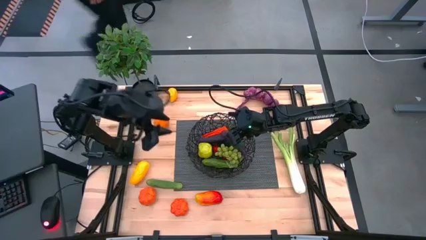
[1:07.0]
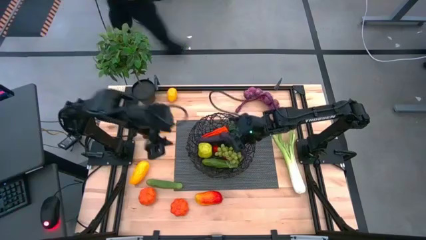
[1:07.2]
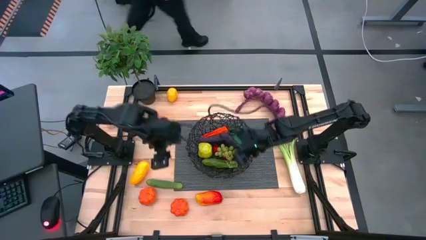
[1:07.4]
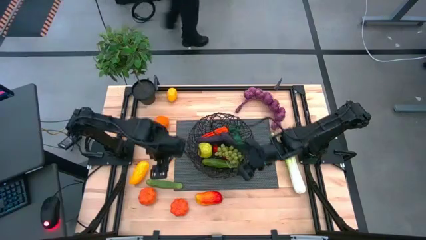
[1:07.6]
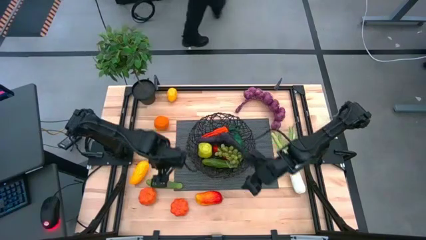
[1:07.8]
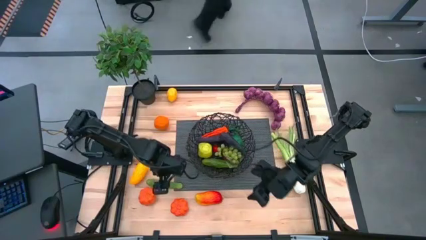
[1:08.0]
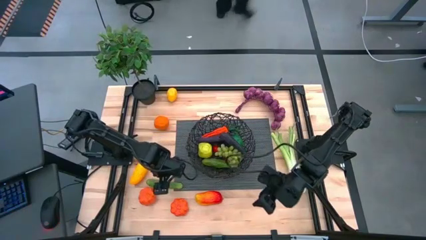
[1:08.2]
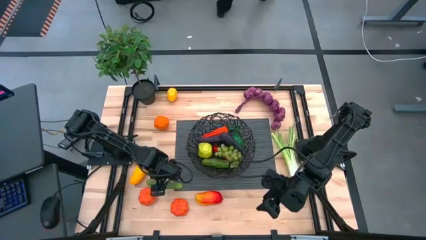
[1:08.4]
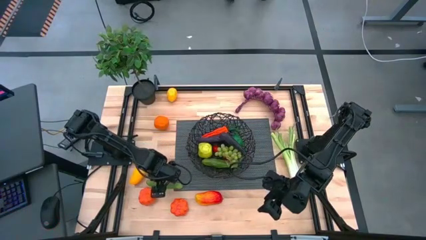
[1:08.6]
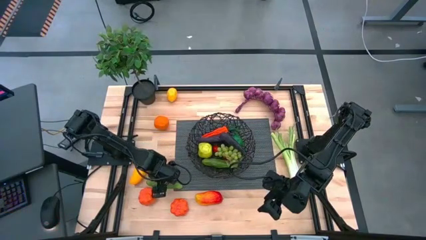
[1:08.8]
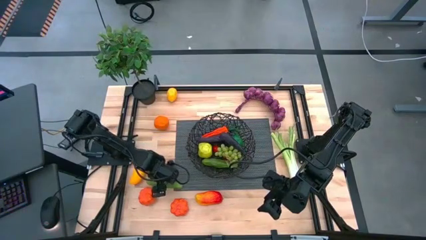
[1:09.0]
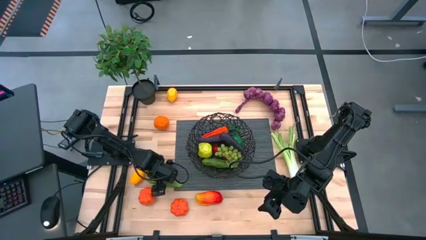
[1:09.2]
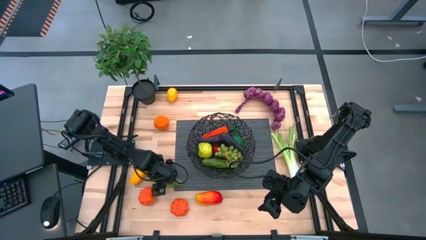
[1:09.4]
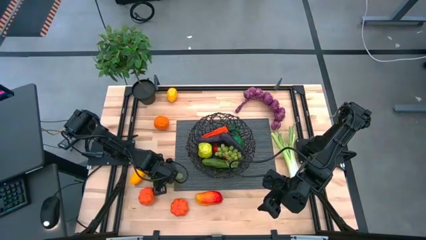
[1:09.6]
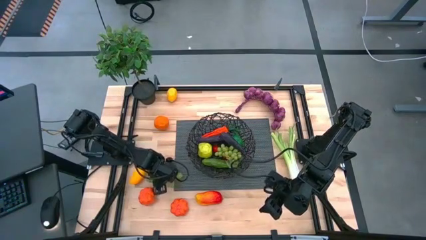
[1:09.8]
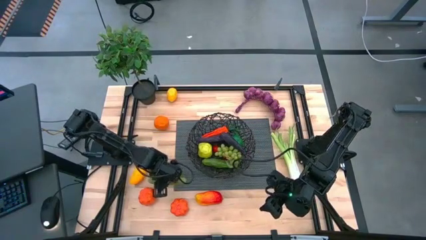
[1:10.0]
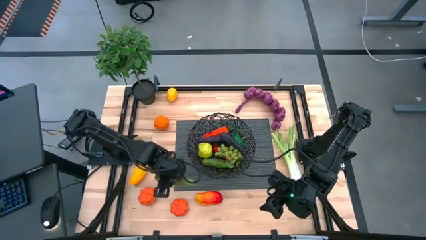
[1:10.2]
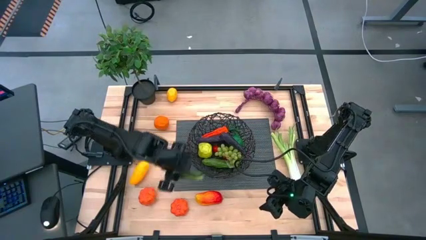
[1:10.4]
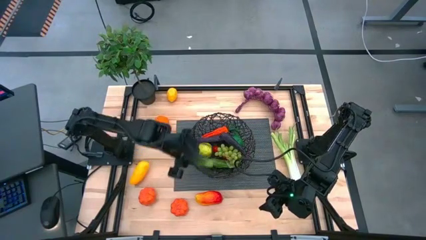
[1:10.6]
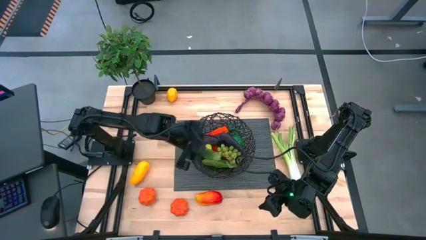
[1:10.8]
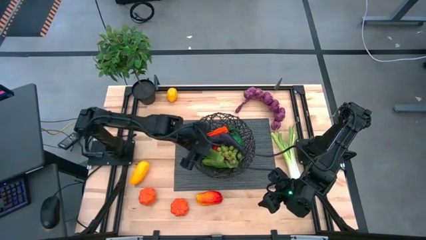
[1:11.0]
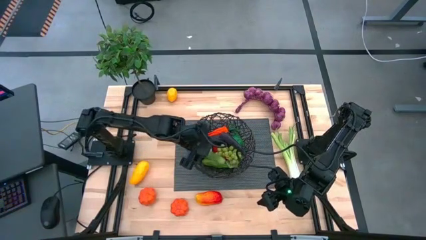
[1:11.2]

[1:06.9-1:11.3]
Task: Build produce basket
Put the cucumber into the black basket

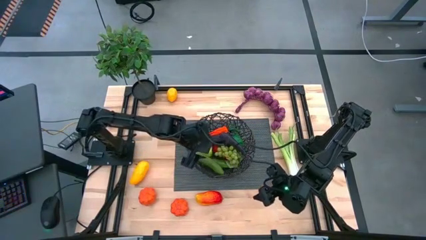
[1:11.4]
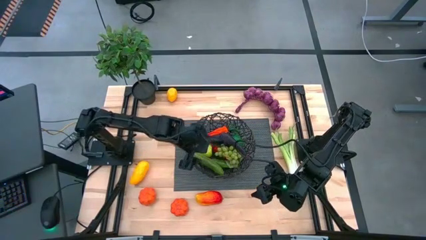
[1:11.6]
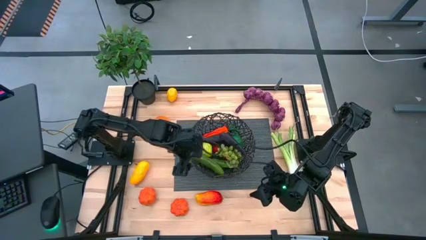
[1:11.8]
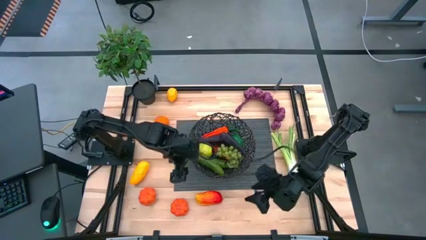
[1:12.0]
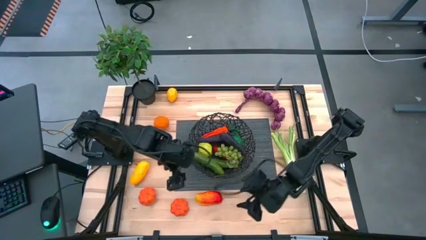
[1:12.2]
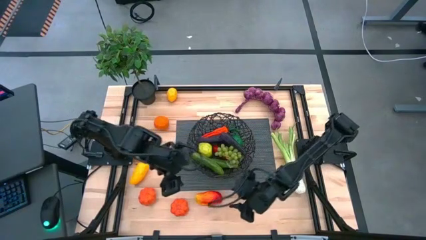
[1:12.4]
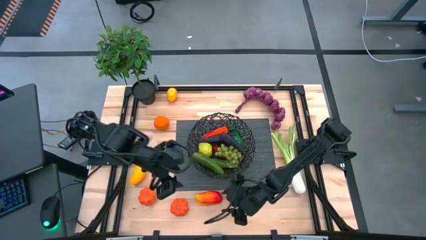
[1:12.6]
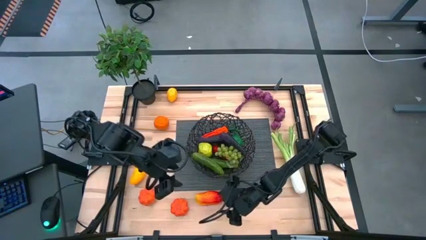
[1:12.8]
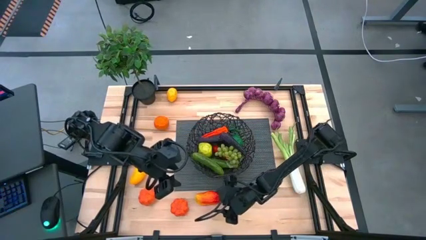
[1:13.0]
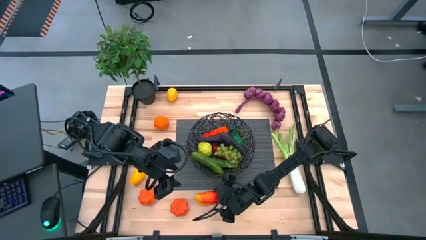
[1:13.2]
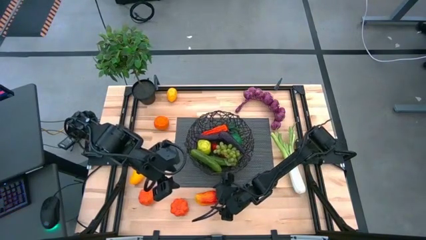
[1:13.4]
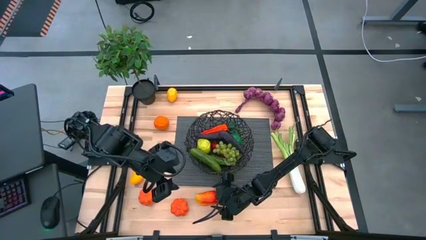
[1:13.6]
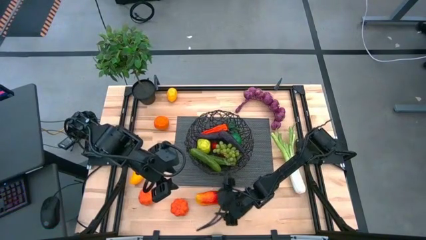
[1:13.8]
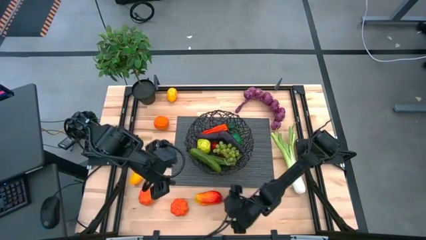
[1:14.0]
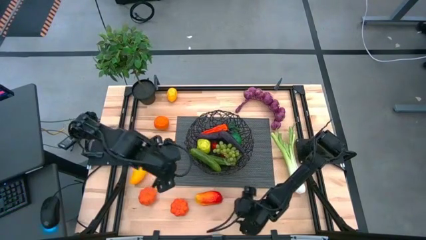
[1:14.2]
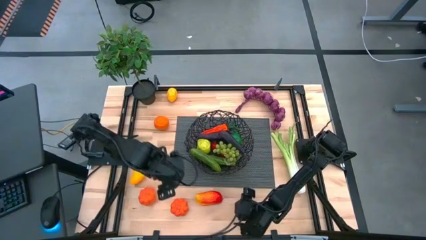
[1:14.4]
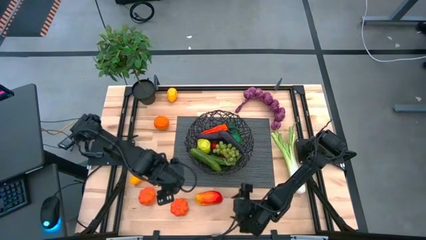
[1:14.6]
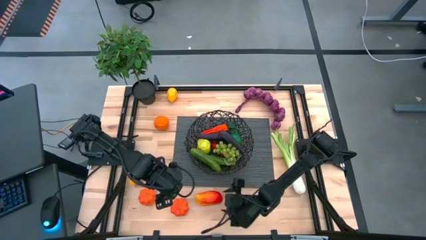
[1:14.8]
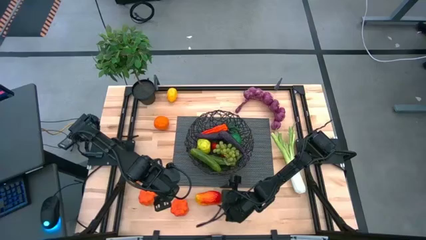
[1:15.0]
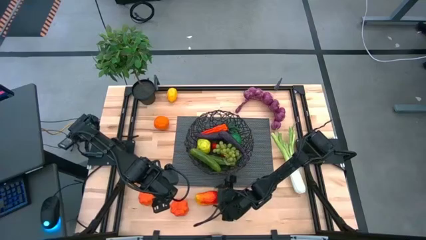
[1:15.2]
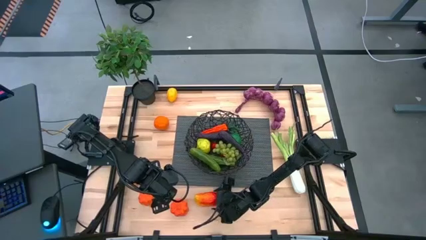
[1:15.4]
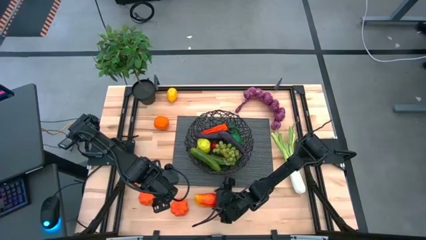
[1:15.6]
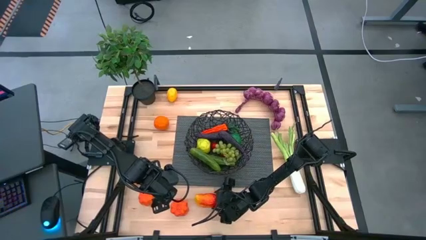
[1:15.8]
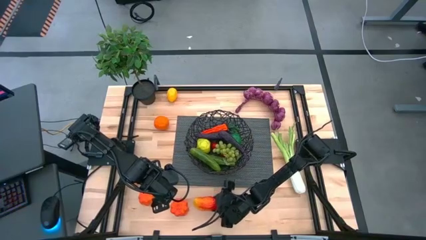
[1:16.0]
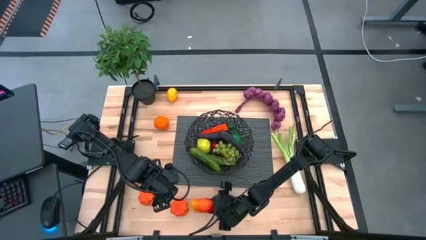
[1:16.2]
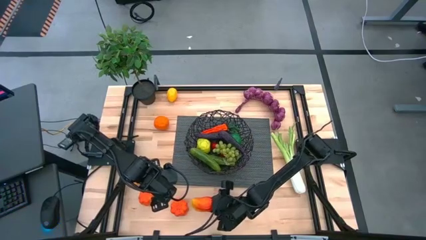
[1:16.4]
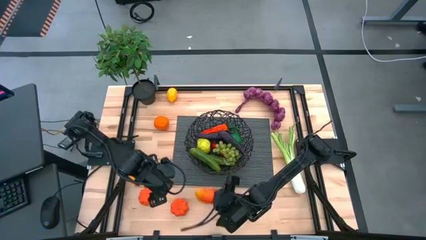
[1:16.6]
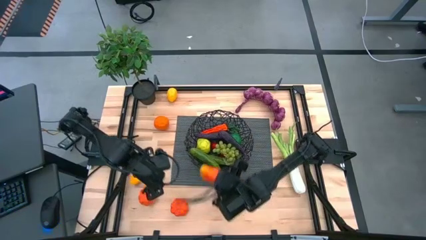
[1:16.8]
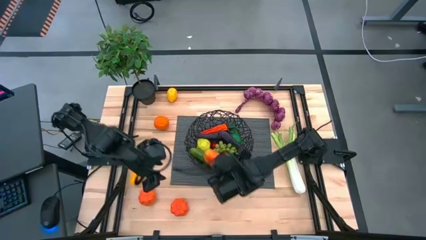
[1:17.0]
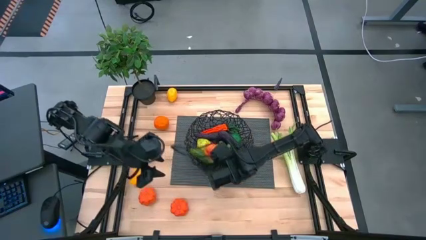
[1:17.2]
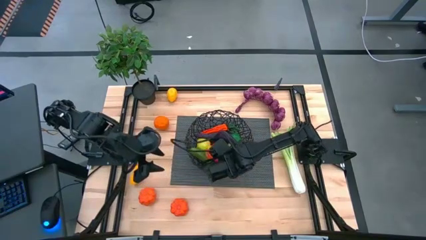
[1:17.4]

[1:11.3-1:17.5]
Put the orange mango into the black basket

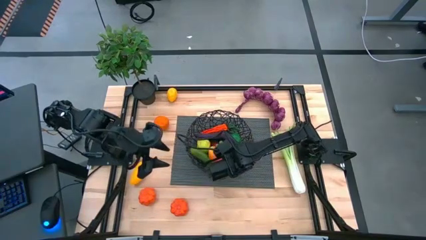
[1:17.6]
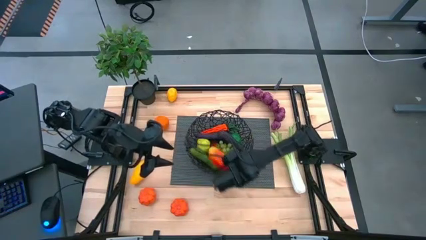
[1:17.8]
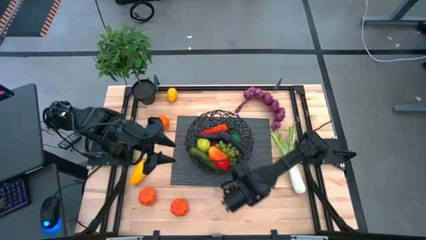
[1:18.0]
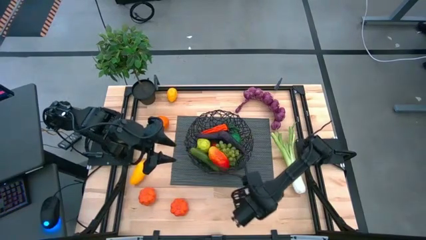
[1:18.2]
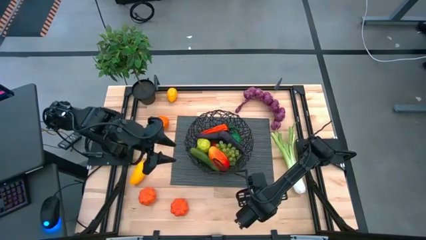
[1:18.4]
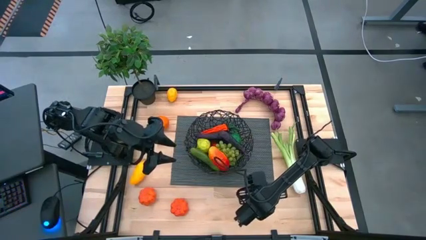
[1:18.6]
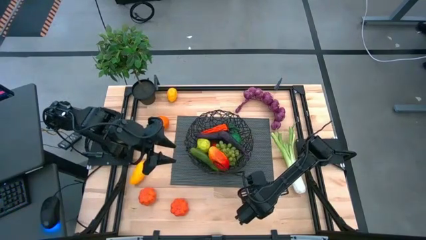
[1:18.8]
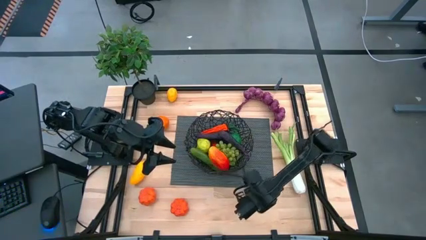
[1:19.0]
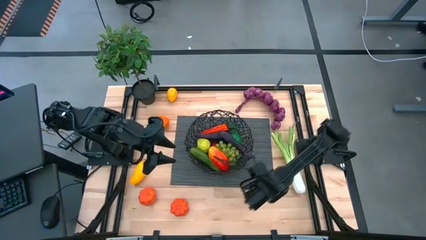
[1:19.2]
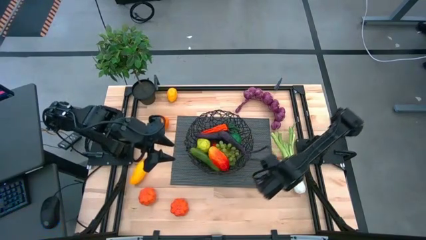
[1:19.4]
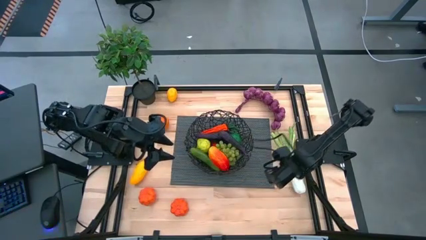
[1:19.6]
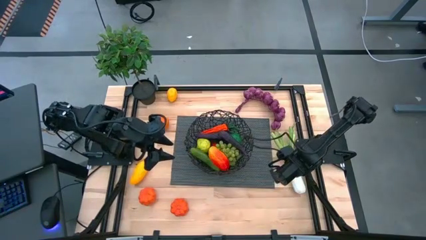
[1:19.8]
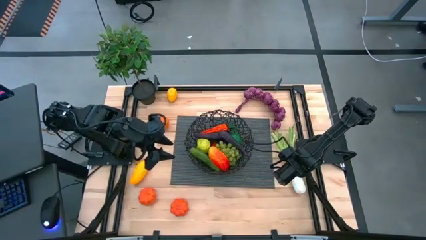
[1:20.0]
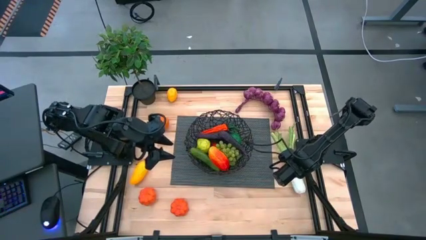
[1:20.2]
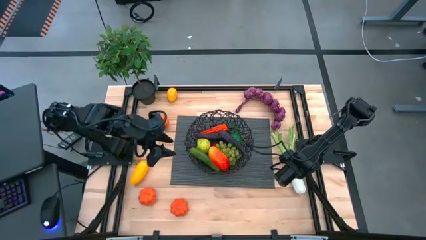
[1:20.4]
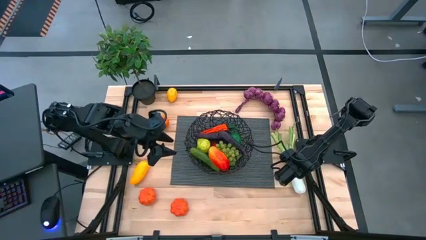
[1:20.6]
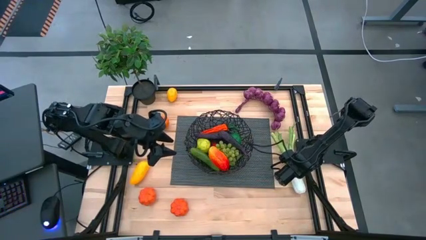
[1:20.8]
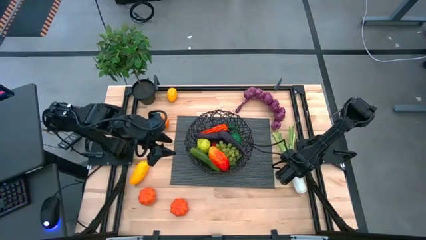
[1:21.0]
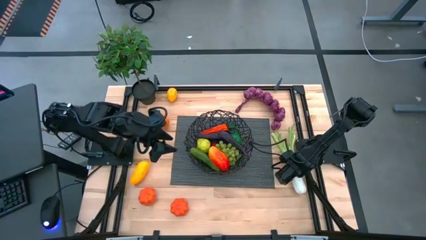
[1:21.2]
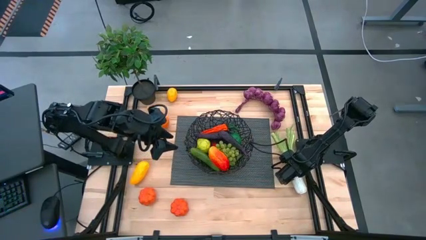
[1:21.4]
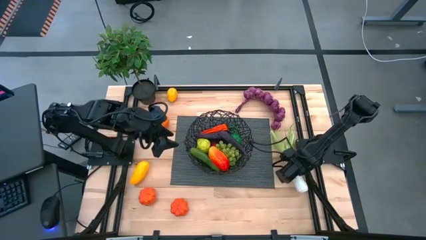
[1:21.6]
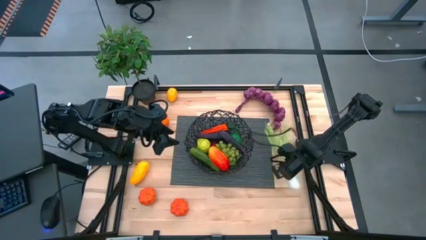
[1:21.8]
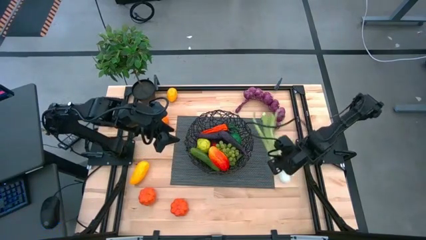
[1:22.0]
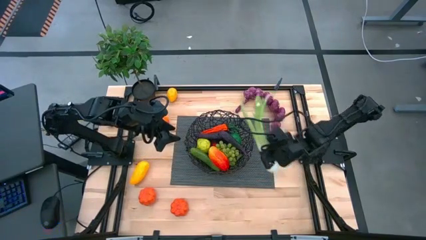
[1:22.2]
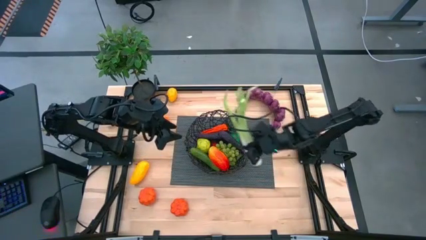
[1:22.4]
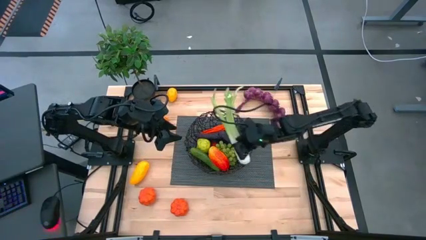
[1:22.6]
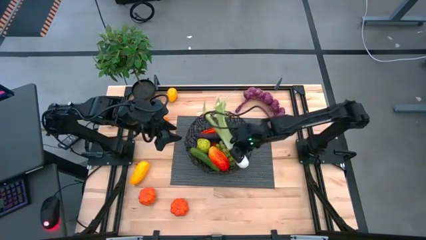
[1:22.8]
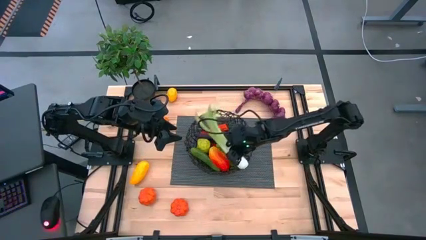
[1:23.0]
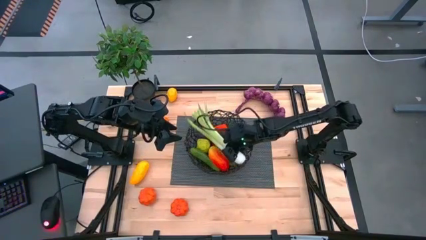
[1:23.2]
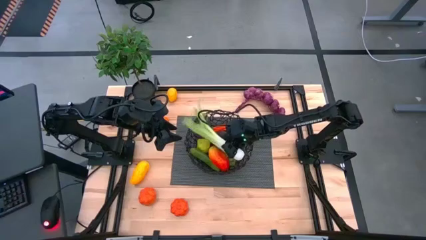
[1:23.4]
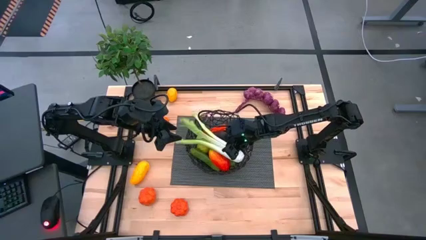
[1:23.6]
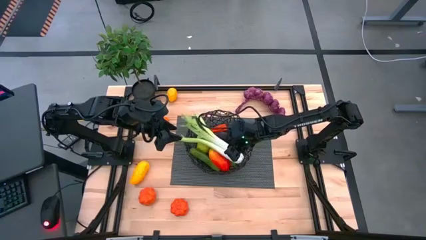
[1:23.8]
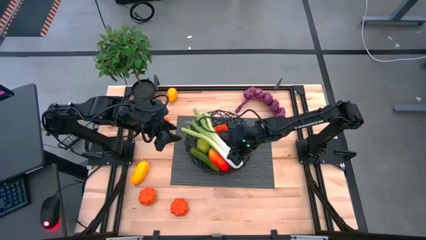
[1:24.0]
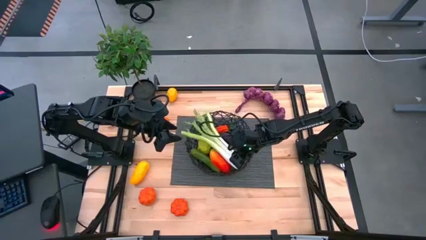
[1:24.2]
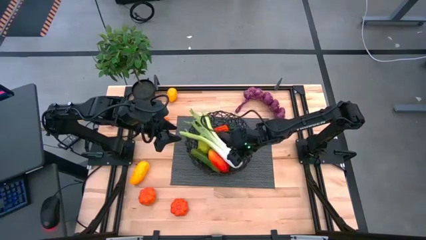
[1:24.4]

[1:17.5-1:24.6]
Put the celery into the black basket
